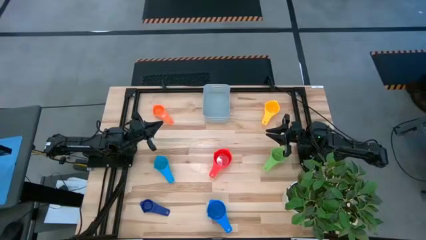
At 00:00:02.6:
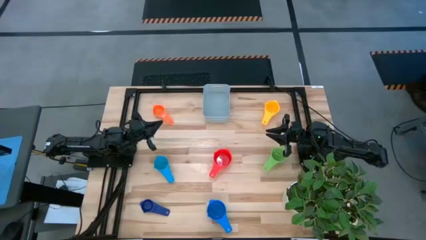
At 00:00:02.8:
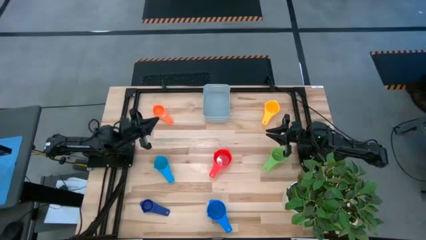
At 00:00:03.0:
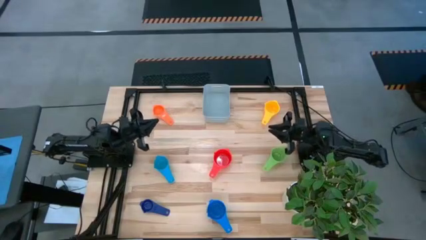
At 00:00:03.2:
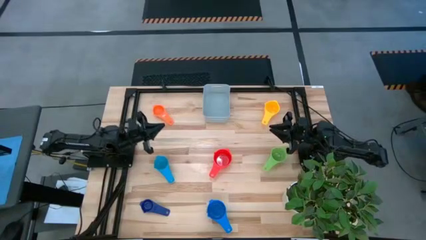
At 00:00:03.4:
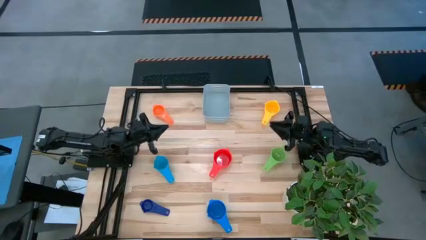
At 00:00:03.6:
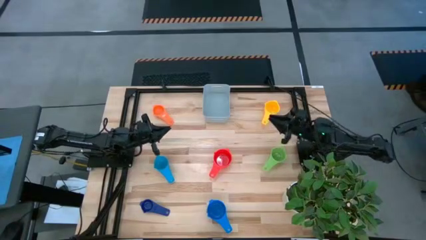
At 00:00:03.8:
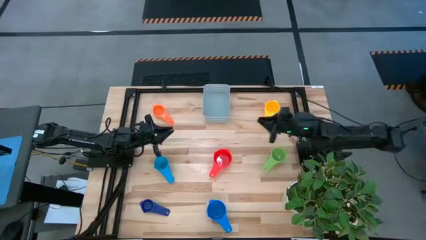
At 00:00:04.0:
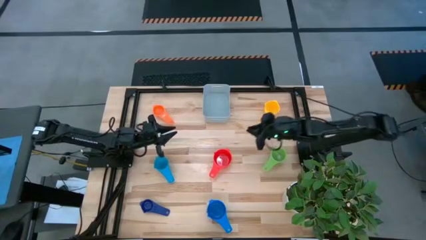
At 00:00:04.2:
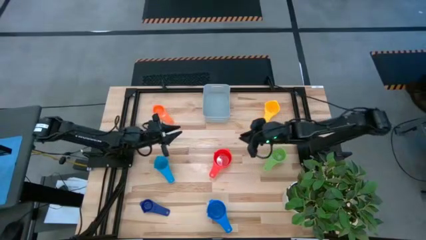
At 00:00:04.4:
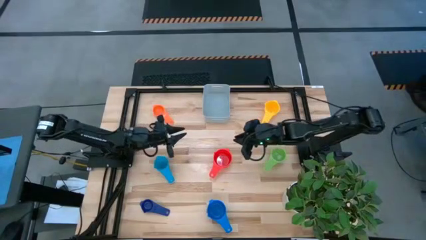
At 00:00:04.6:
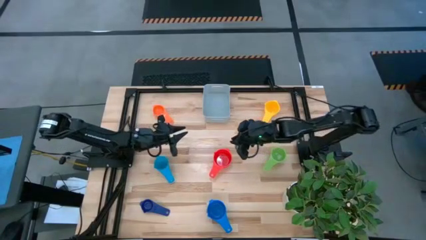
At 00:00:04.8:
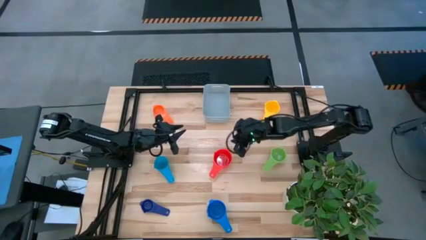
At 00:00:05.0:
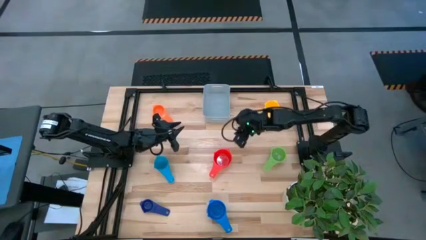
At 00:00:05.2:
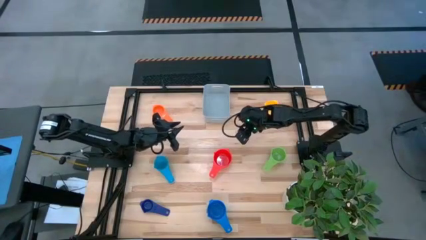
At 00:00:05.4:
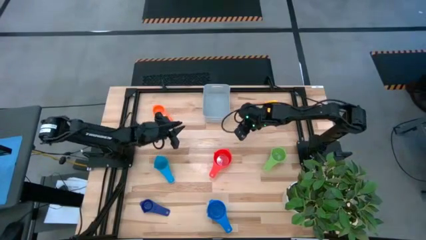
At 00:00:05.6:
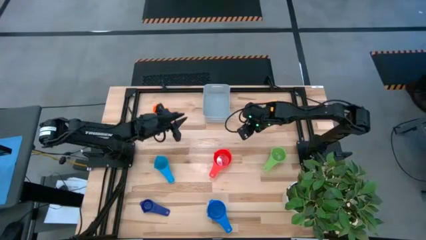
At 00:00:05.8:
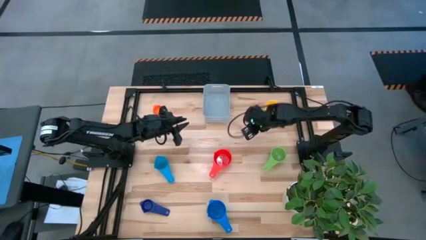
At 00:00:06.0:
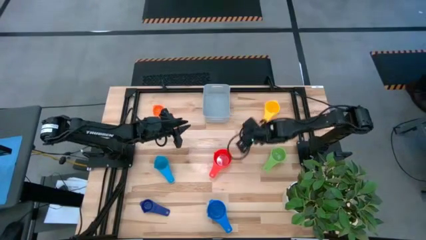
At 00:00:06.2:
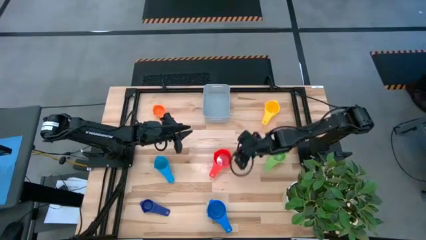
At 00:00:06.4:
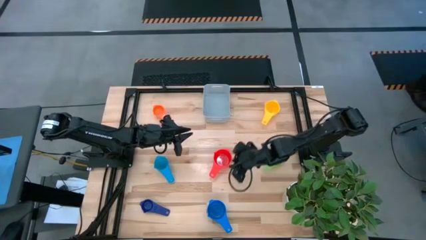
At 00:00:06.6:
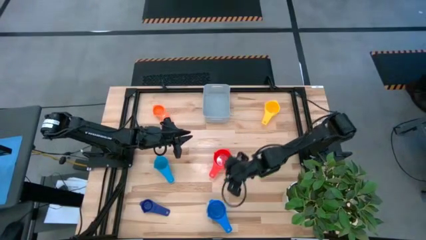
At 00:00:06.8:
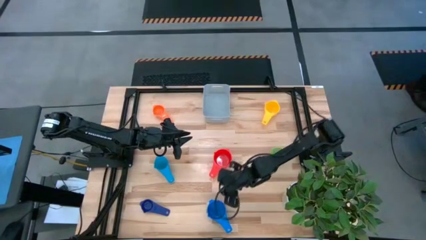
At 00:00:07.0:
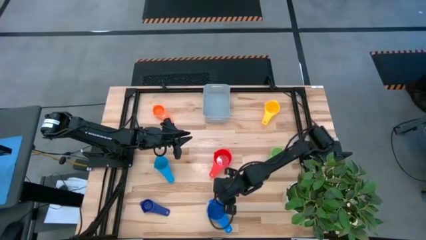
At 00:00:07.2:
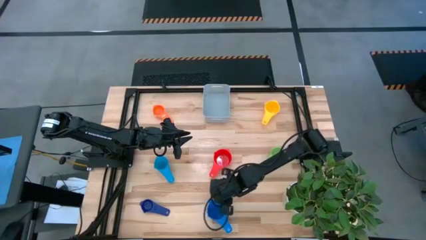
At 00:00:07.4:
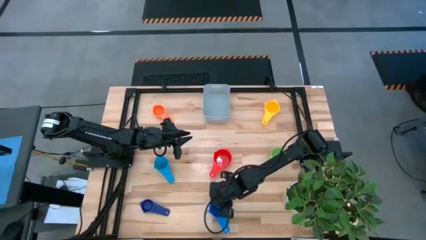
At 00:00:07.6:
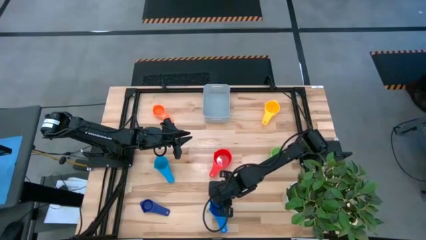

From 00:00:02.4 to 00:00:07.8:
Task: Nest measuring cups in basket
Stack the bottom blue measuring cup on top of the red measuring cup

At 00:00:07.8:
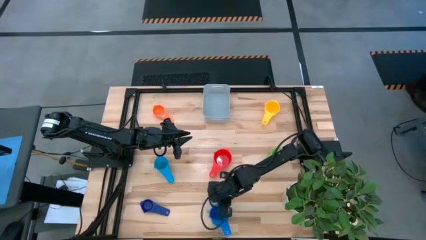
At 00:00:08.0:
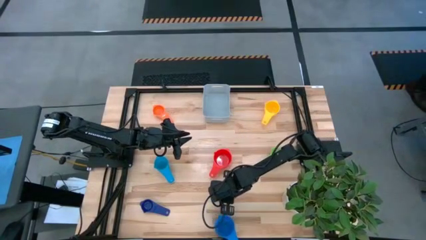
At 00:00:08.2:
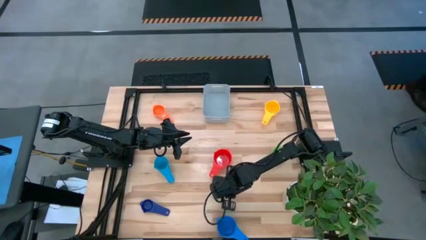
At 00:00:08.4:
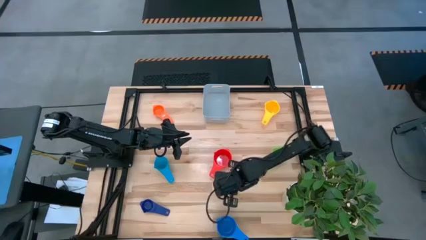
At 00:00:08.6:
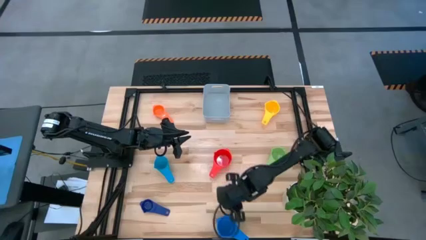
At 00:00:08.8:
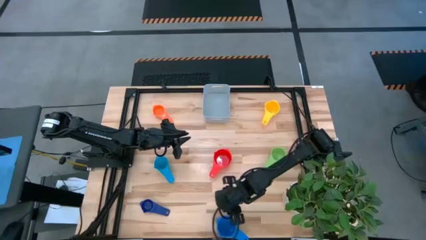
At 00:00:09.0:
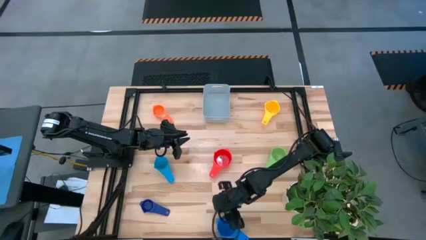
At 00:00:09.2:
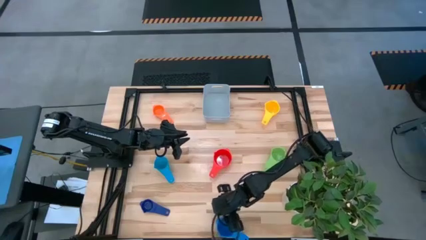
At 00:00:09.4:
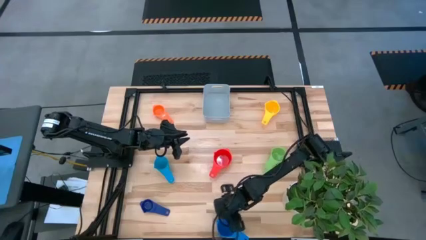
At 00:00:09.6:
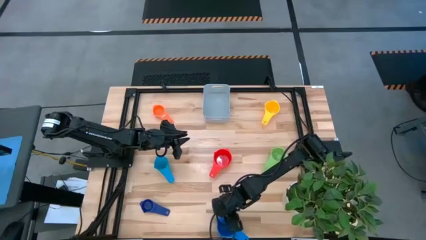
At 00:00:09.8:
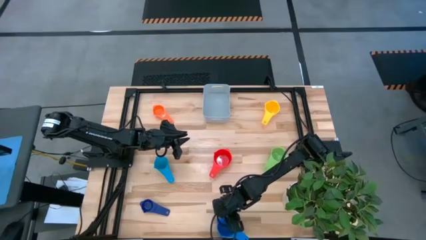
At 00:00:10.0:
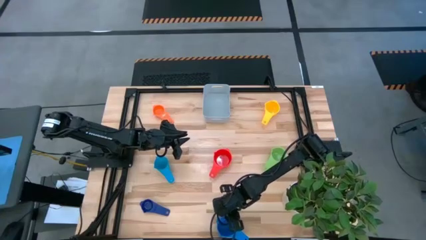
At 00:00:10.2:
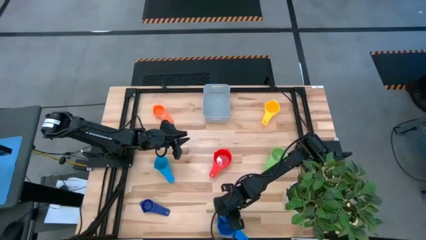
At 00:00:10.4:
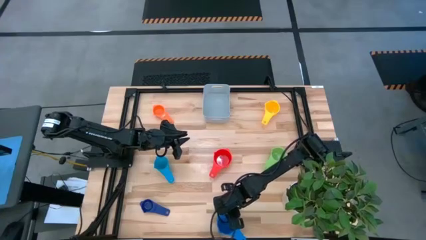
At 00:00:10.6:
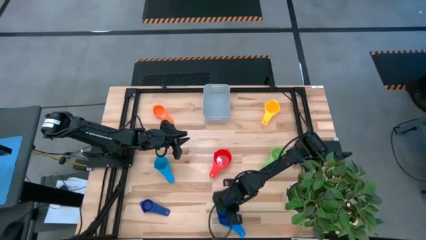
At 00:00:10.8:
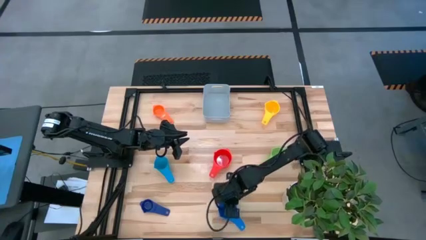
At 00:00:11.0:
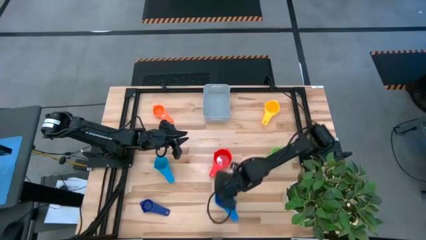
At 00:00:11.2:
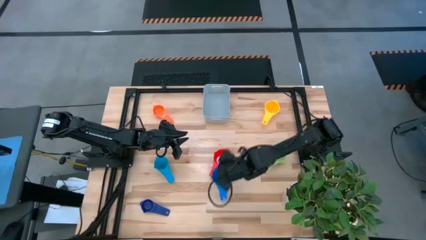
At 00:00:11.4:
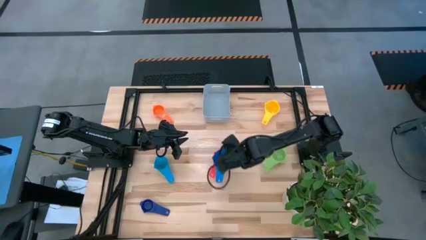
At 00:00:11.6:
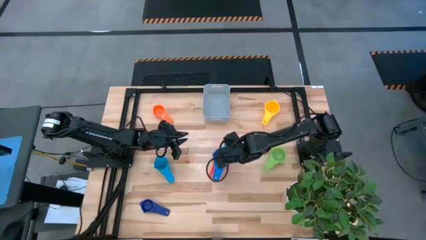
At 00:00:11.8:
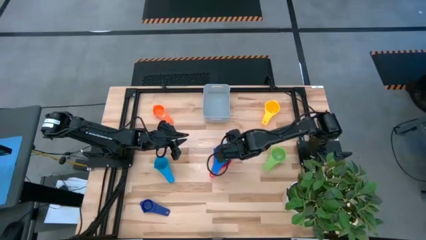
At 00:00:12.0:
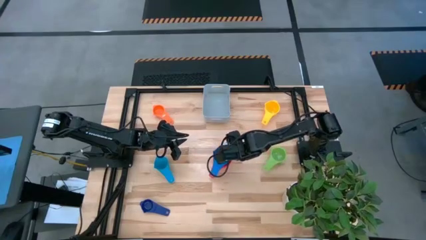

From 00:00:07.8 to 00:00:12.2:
Stack the bottom blue measuring cup on top of the red measuring cup

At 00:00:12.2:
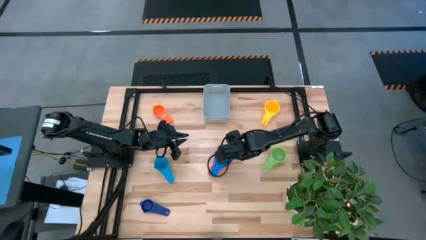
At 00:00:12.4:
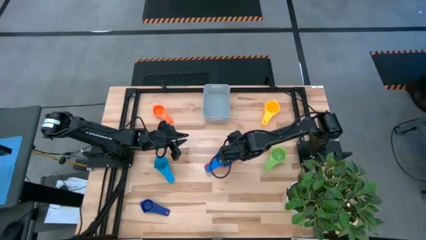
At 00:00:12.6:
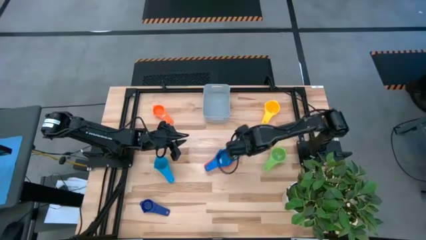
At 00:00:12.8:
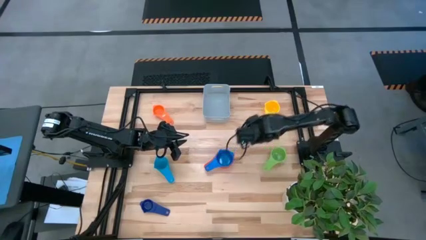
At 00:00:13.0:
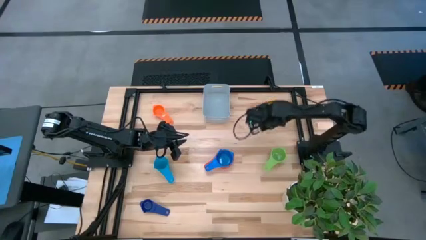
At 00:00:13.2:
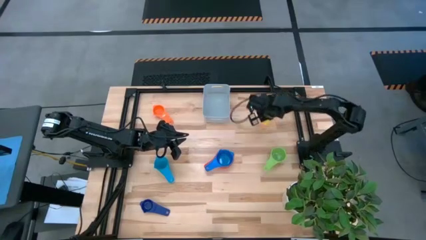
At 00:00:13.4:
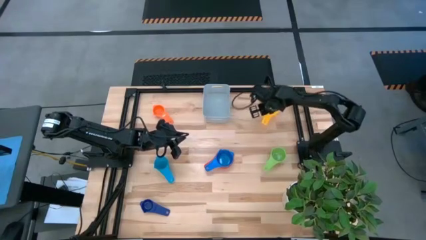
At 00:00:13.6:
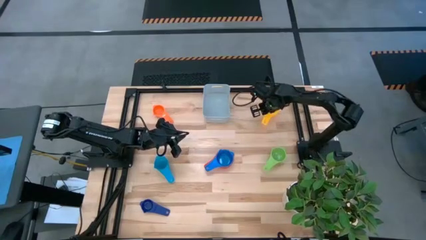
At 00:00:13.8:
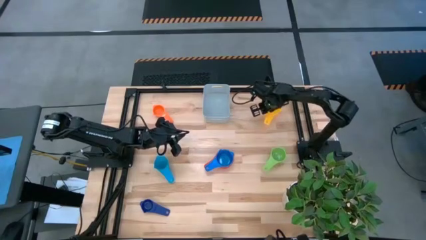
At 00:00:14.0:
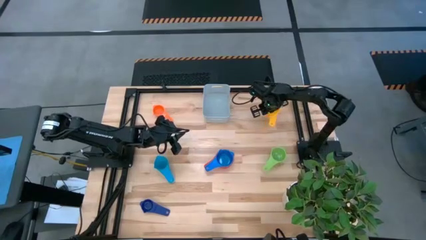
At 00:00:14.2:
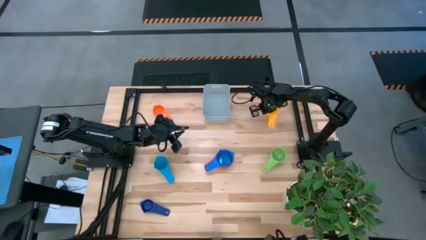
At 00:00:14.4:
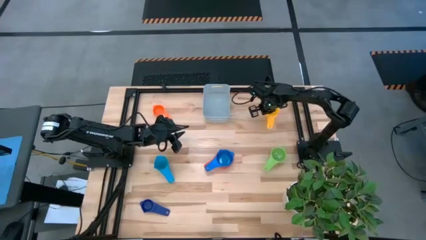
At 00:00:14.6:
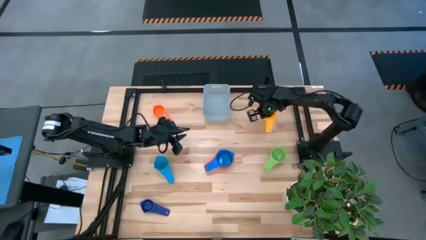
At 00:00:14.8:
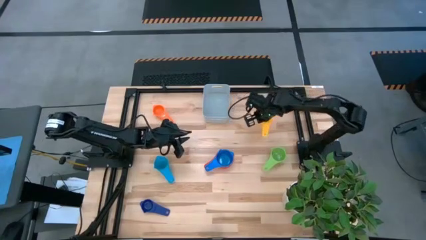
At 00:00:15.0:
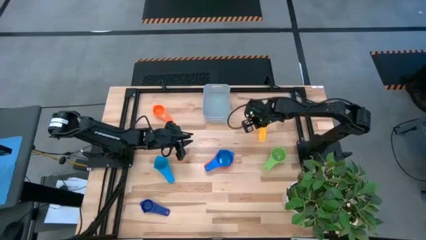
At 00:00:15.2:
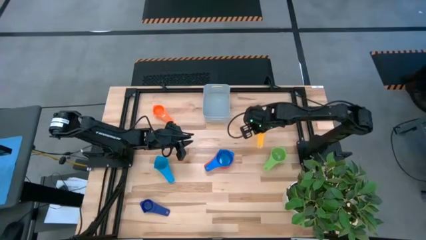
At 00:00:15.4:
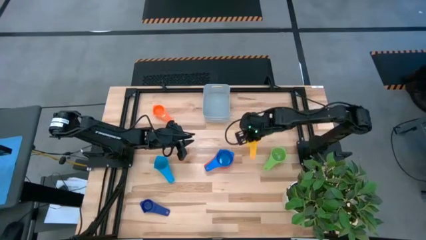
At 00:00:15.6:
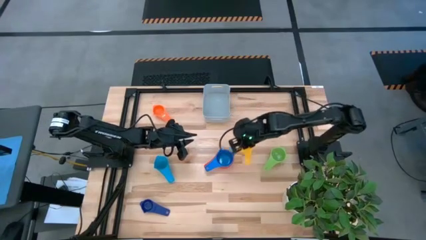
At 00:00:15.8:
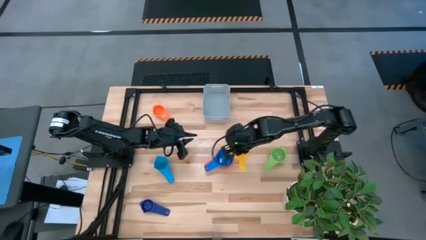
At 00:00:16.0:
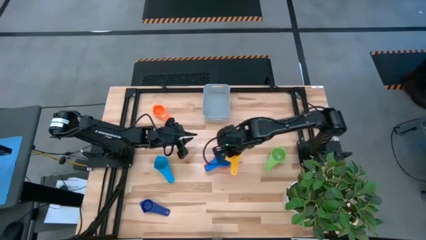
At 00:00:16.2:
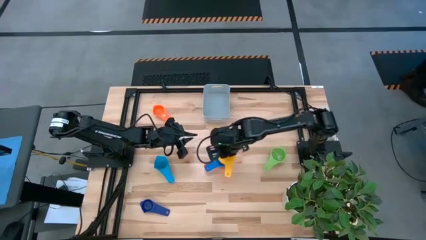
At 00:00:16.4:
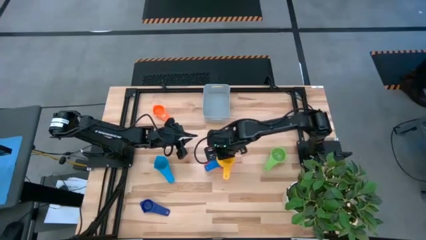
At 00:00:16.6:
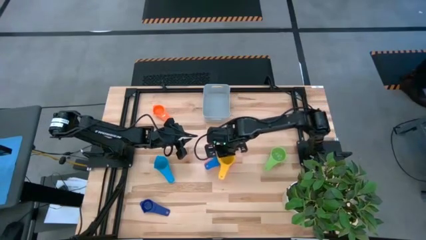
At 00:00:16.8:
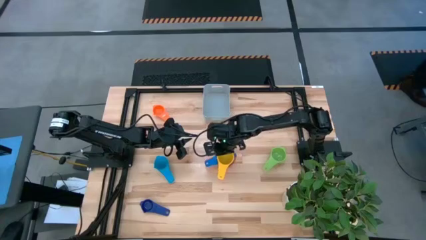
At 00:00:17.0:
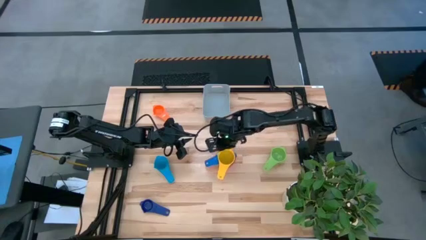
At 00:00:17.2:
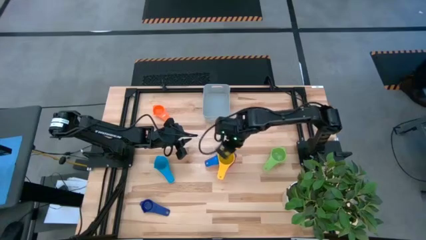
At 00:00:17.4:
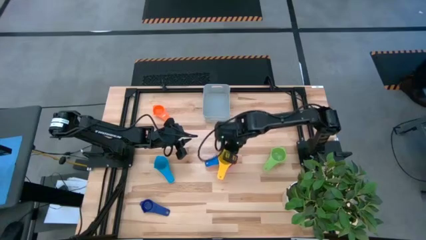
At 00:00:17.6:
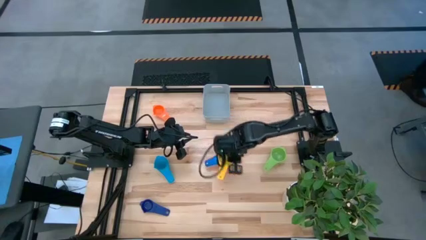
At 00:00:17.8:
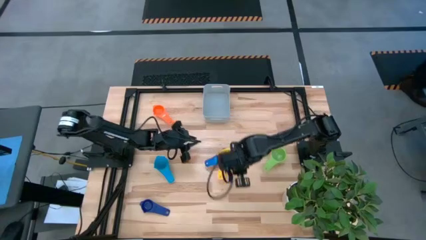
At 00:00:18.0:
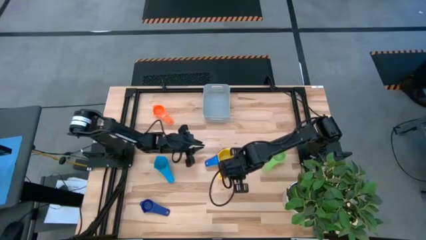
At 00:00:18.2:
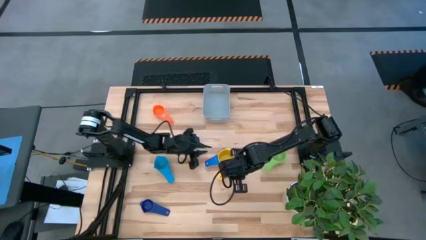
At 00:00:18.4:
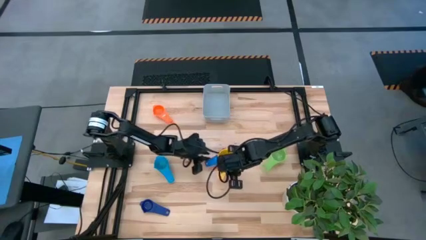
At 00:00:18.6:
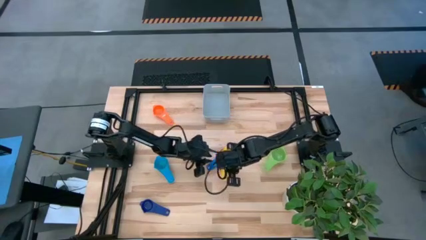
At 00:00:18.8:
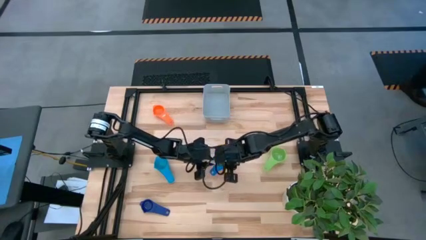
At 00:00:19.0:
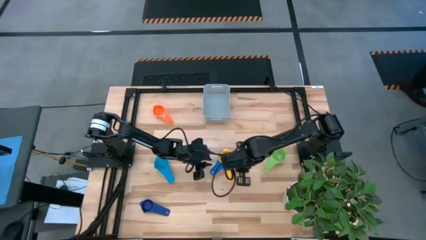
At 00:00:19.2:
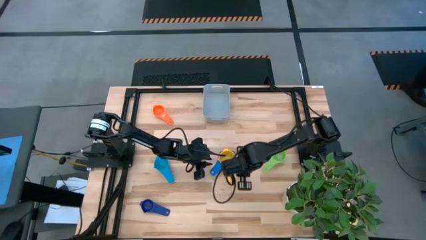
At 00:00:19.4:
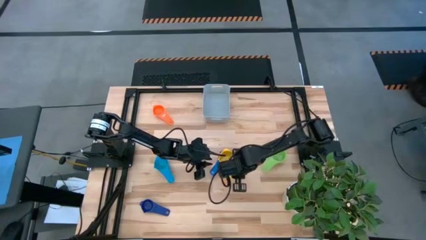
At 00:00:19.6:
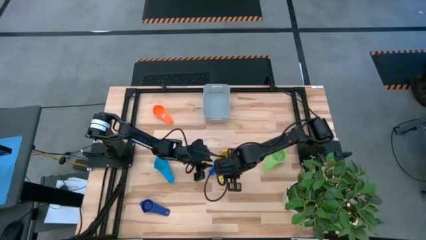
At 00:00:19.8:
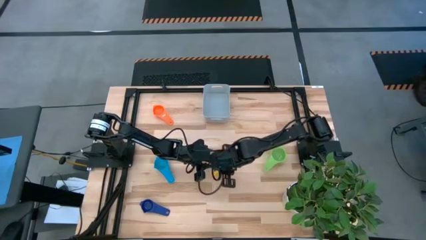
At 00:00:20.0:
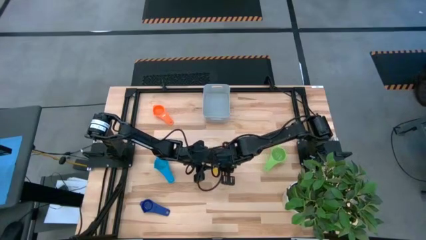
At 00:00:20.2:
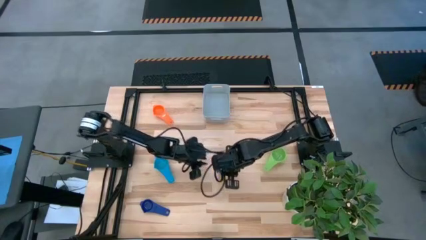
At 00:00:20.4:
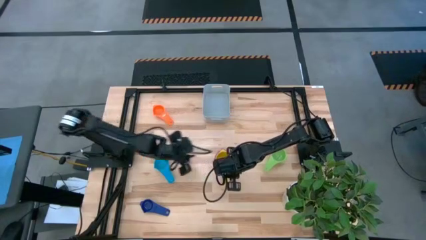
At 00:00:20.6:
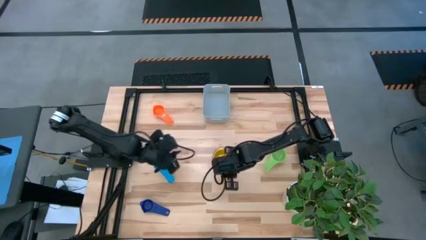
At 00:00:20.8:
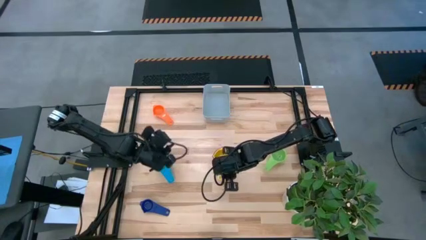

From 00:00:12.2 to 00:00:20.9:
Stack the yellow measuring cup on top of the blue measuring cup
